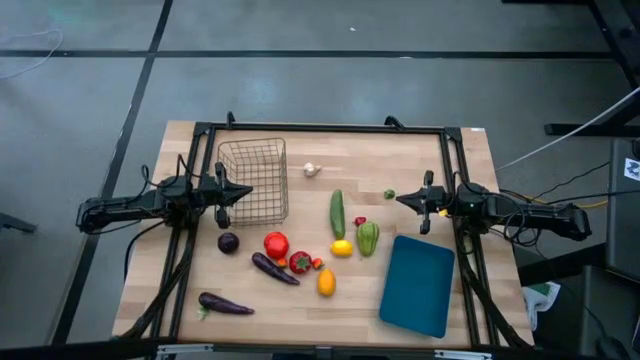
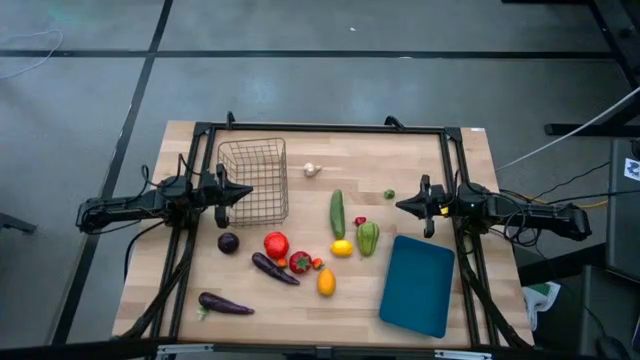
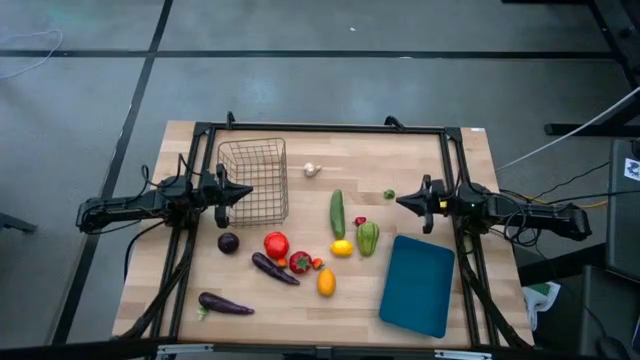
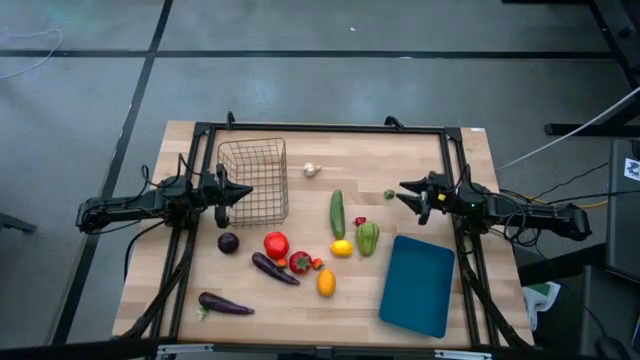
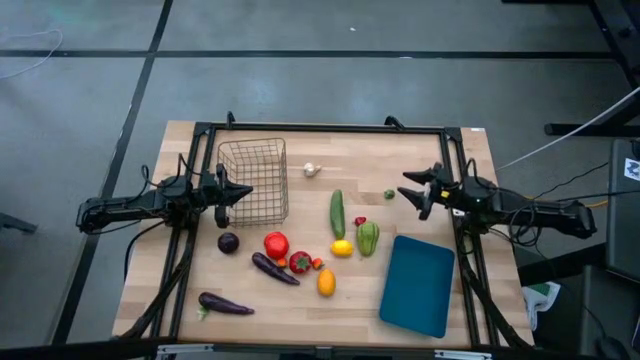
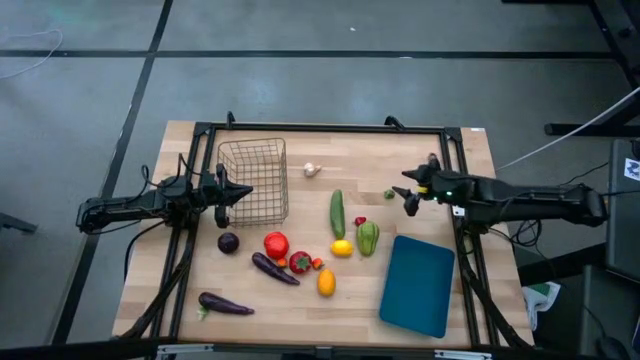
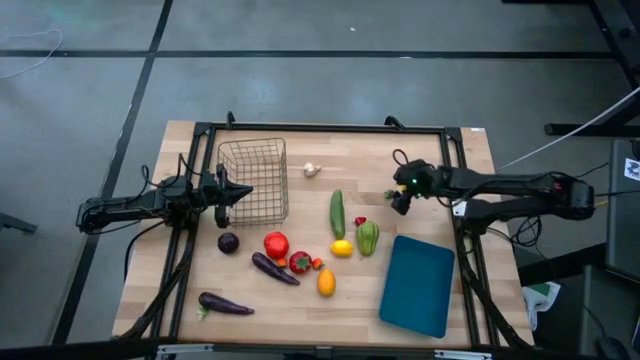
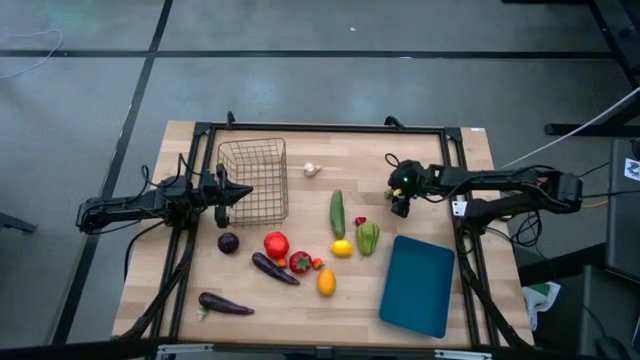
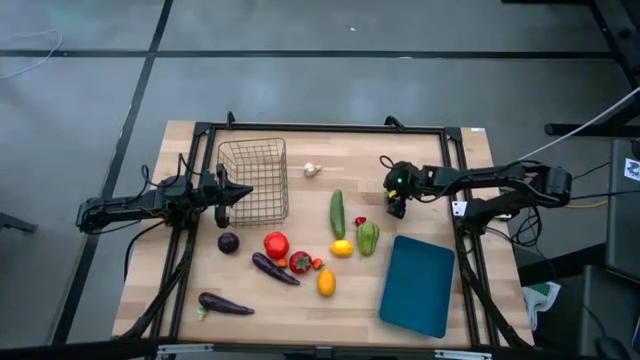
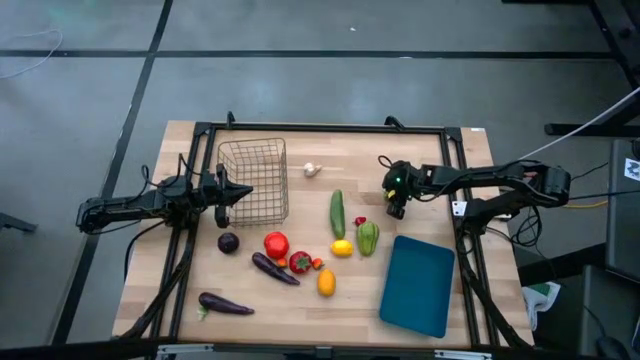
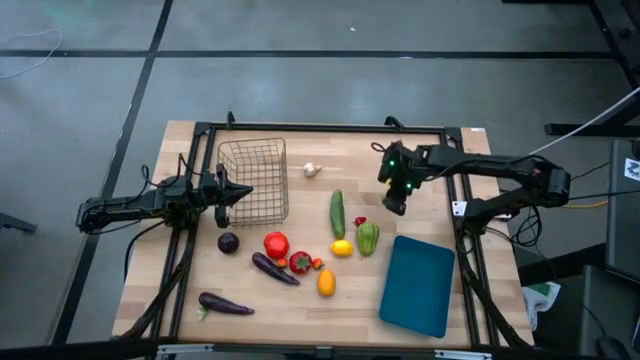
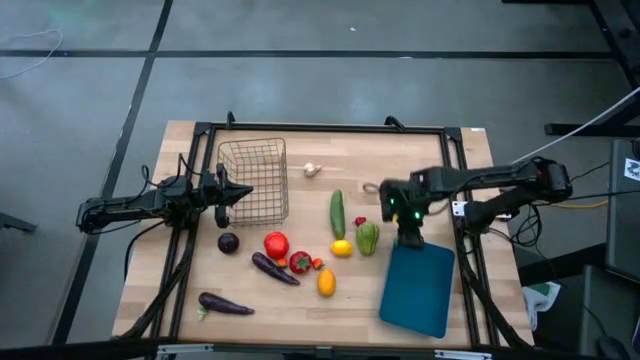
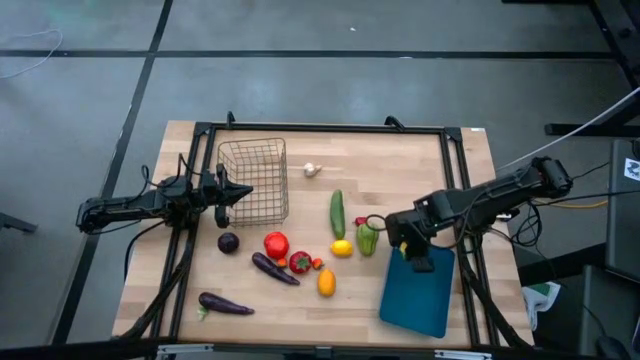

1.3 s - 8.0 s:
Task: Sort produce into baskets
Put the green chili into the blue bin

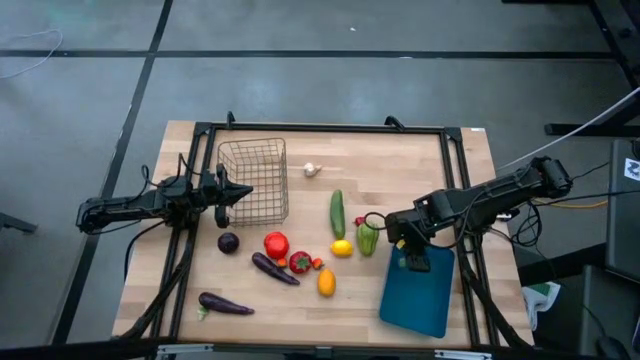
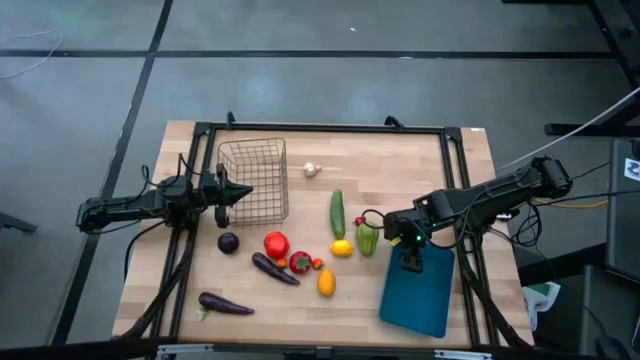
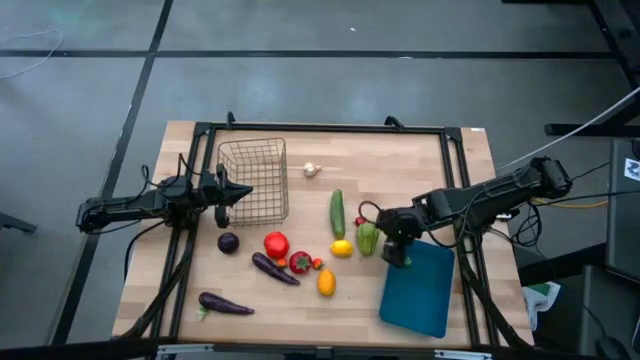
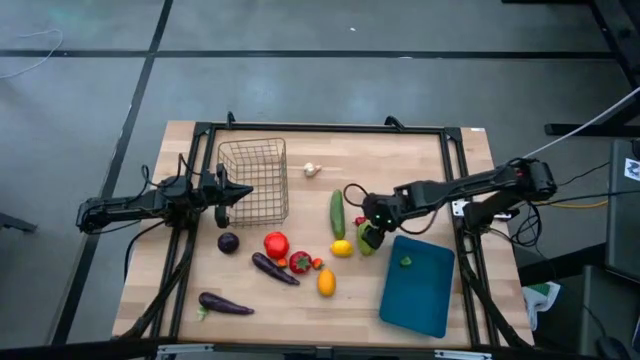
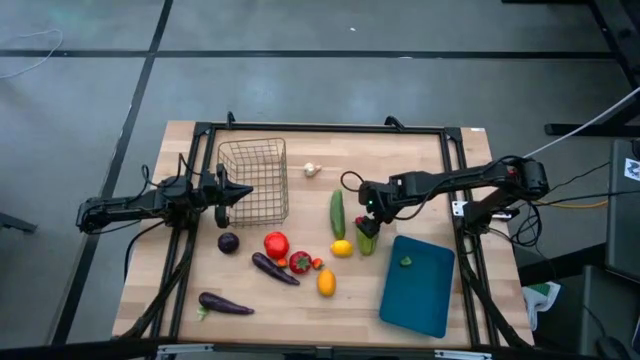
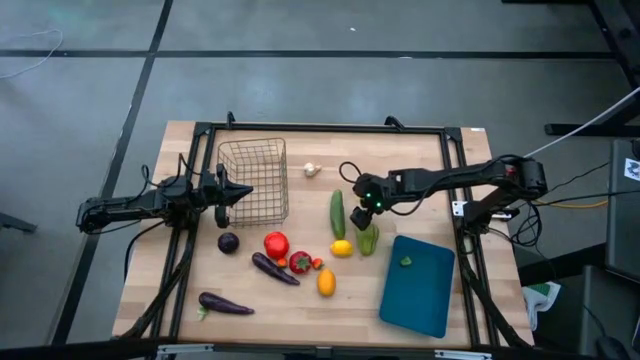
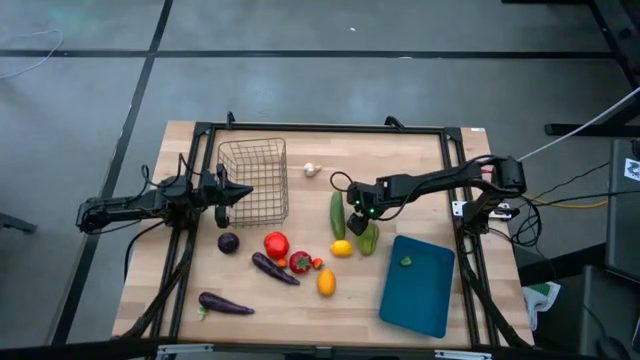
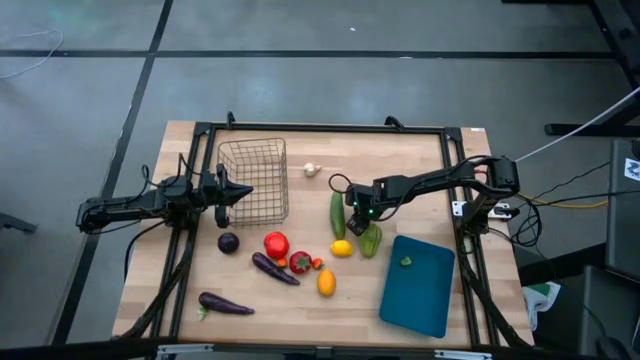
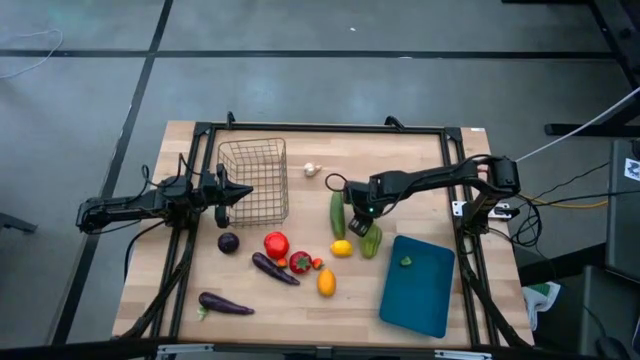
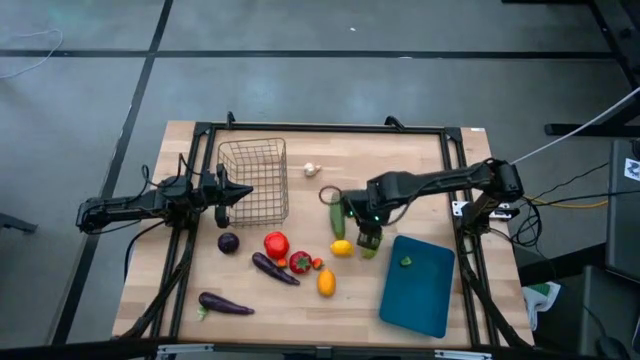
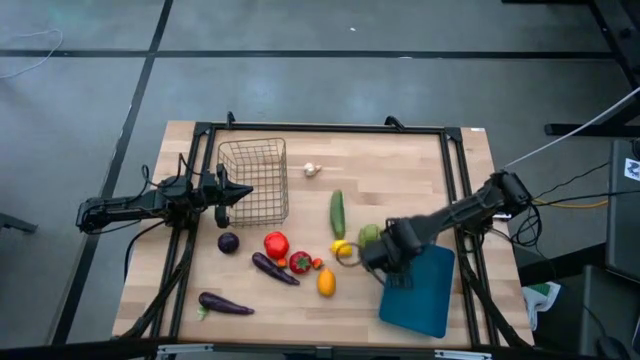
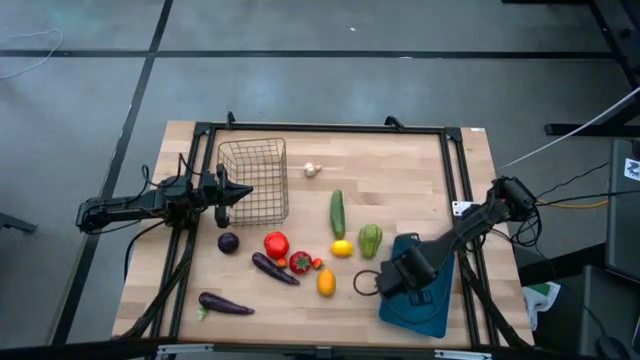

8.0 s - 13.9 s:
Put the red chili pepper into the blue bin

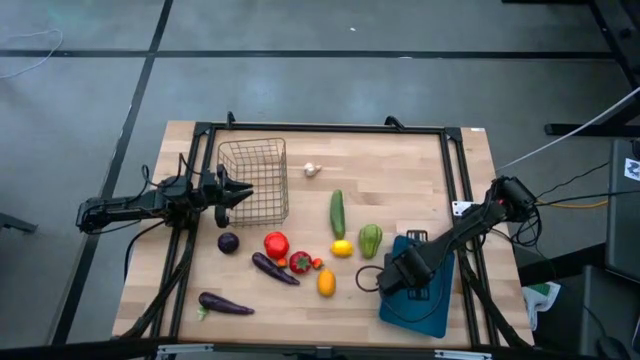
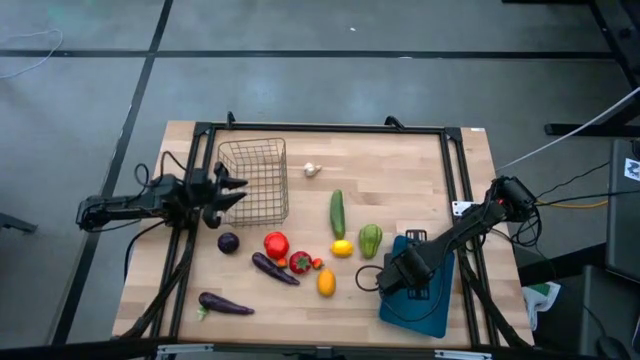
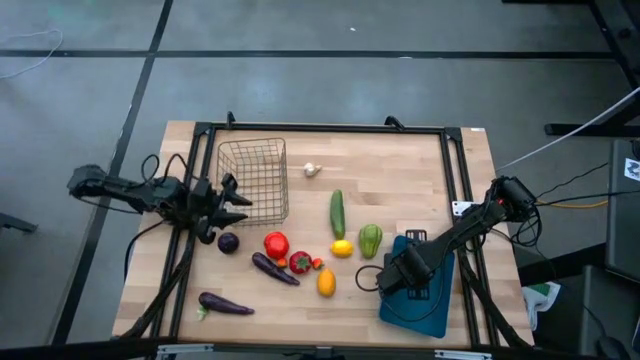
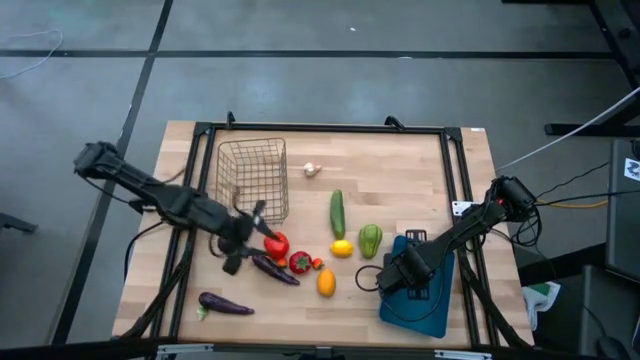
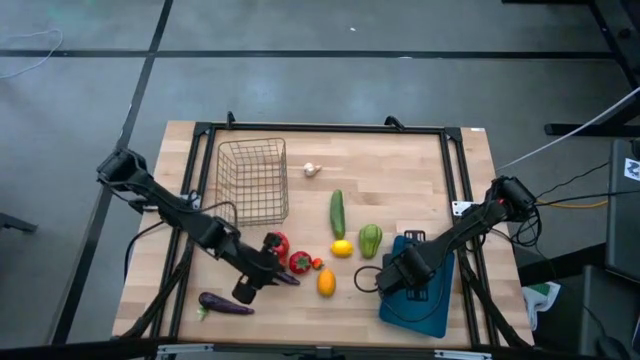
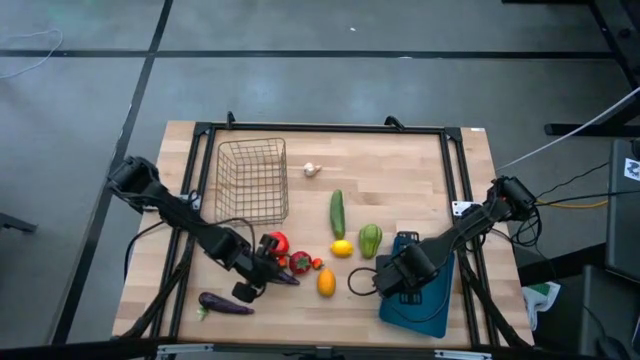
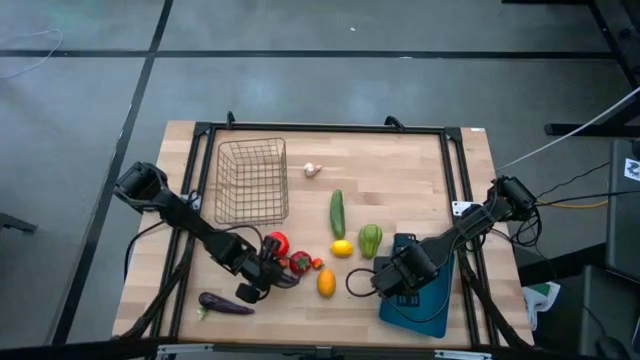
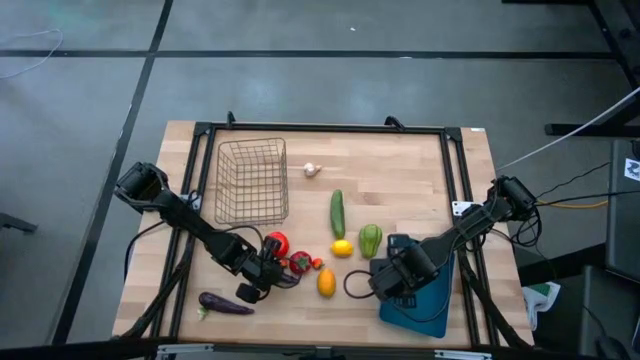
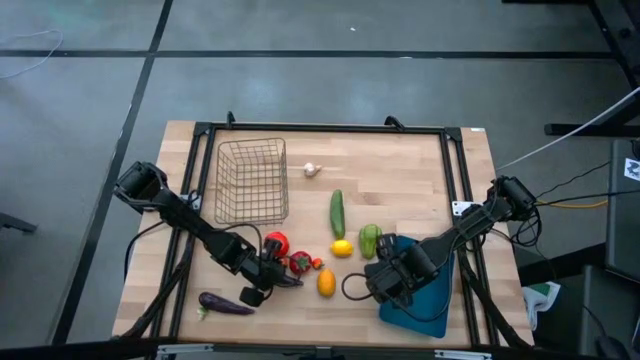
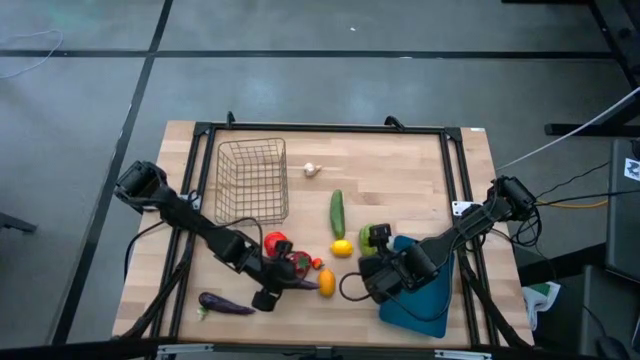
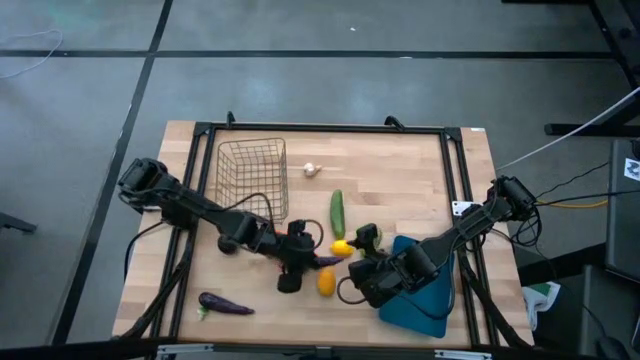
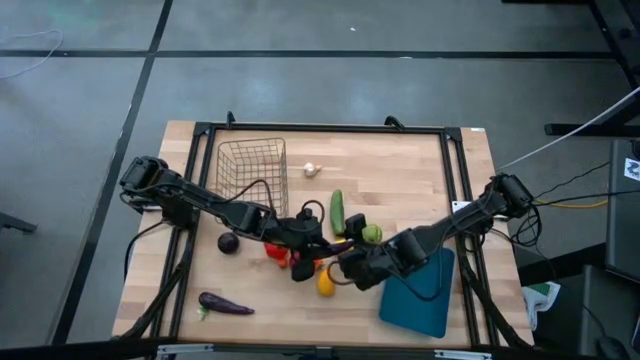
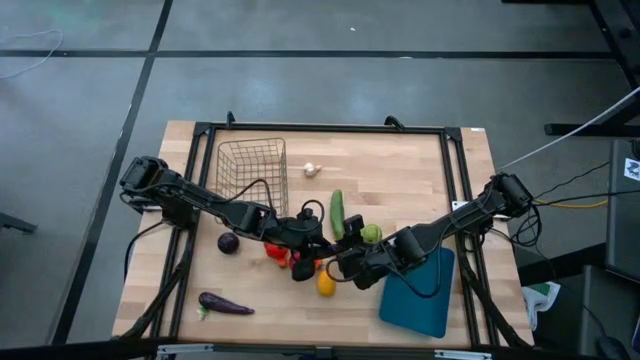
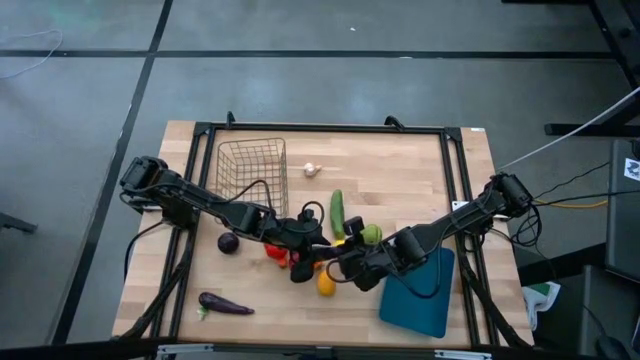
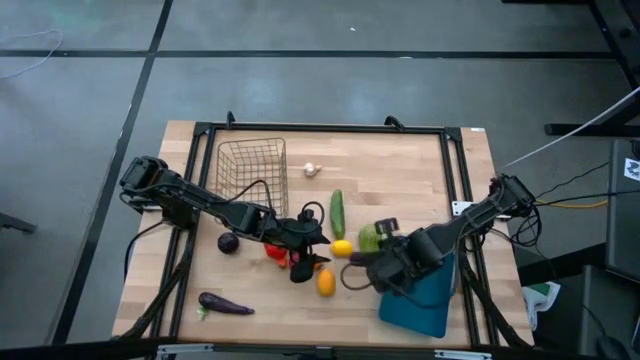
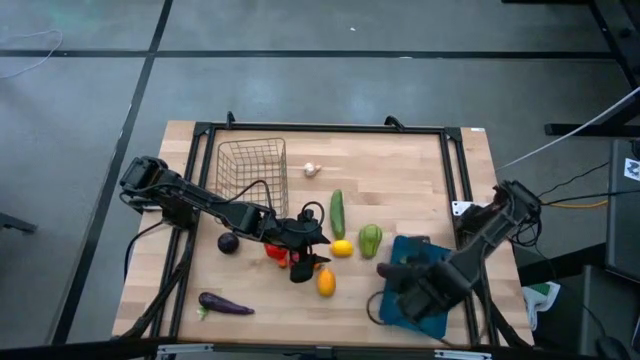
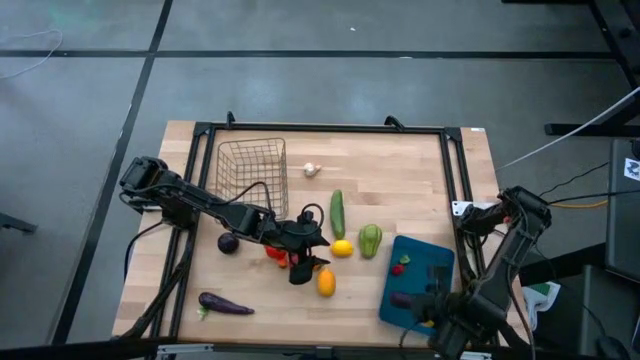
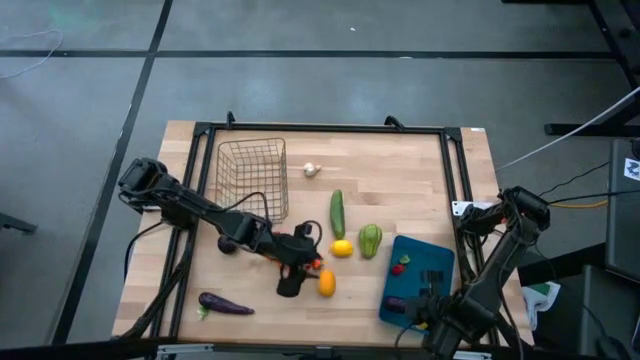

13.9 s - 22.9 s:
Put the violet eggplant into the blue bin
